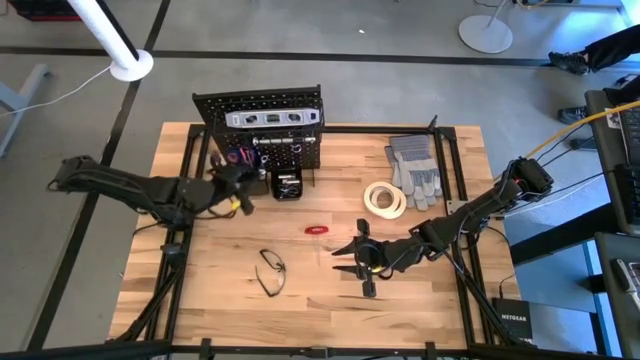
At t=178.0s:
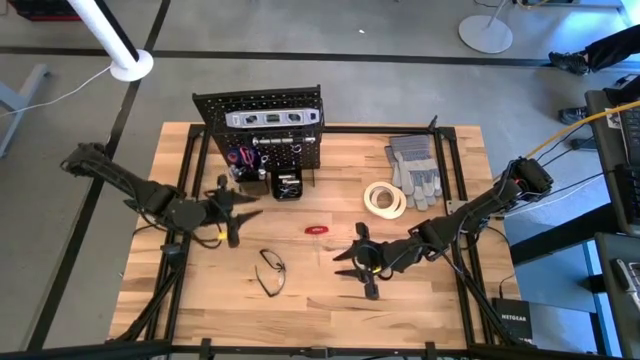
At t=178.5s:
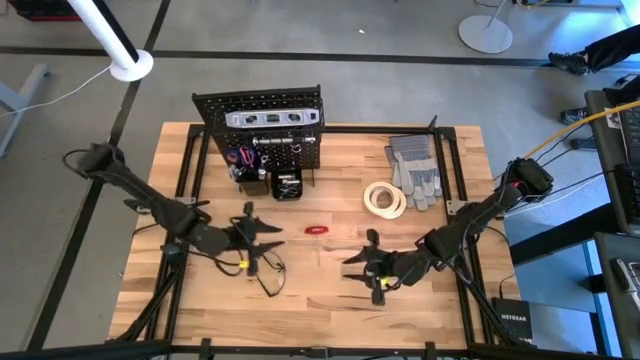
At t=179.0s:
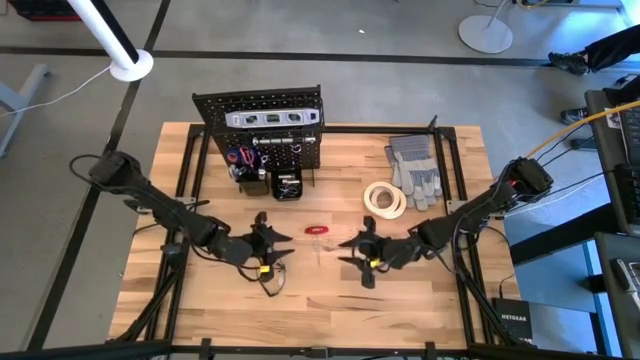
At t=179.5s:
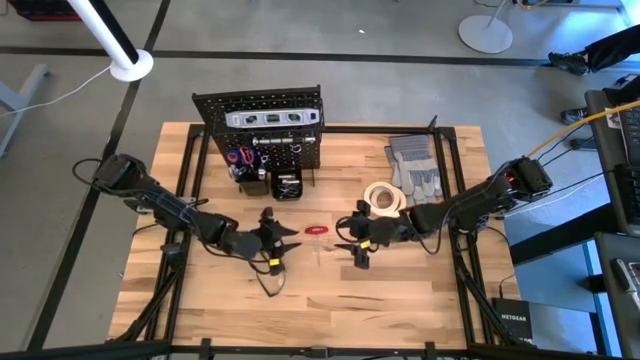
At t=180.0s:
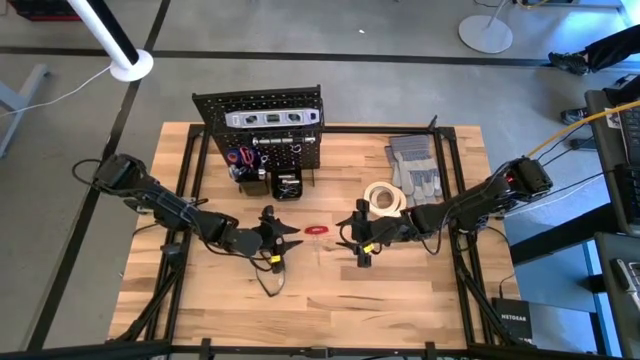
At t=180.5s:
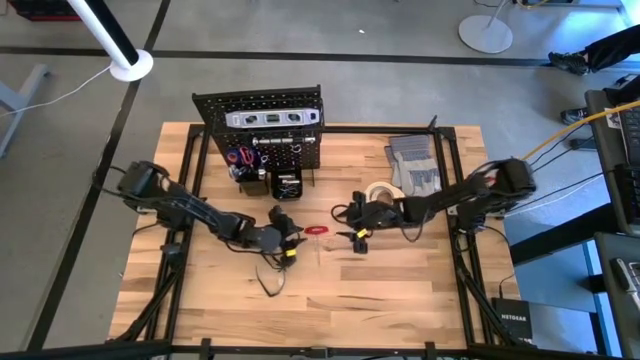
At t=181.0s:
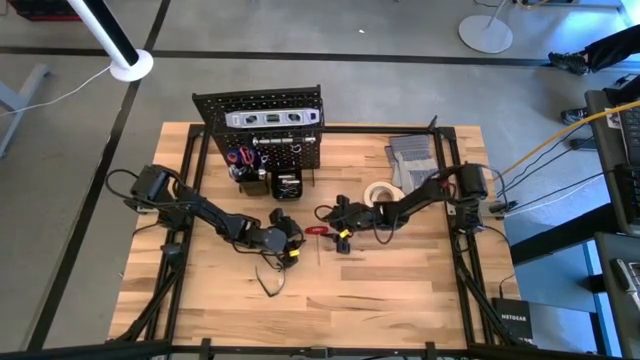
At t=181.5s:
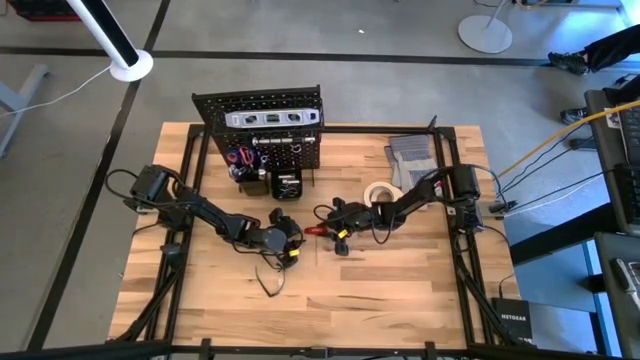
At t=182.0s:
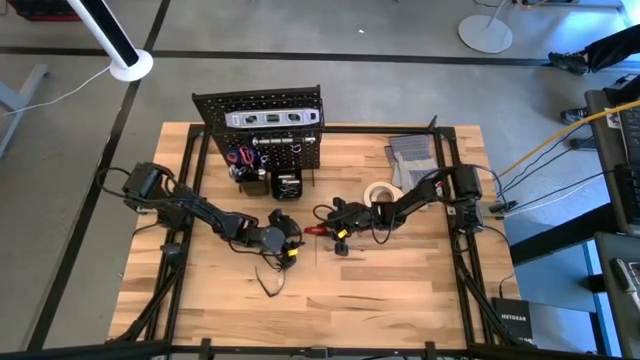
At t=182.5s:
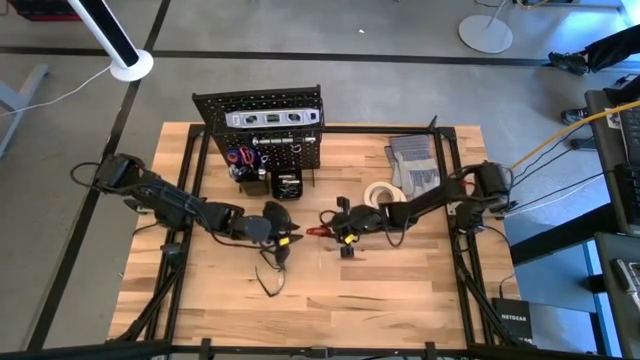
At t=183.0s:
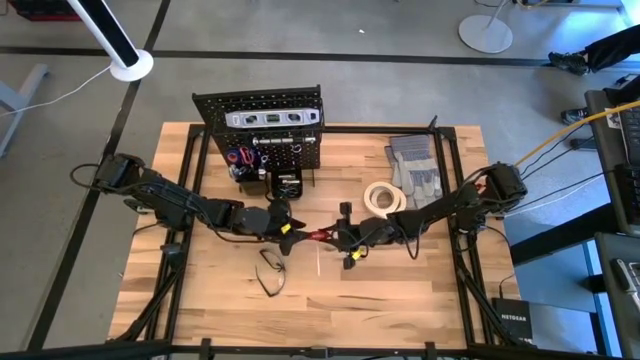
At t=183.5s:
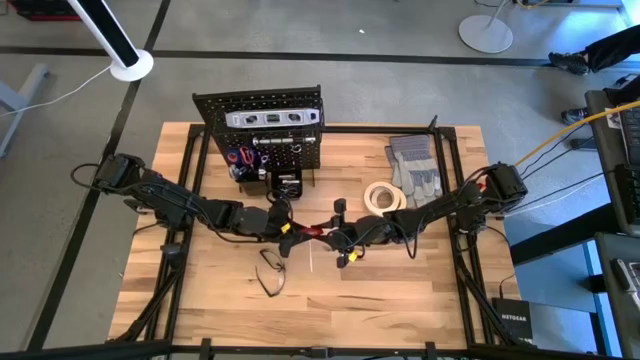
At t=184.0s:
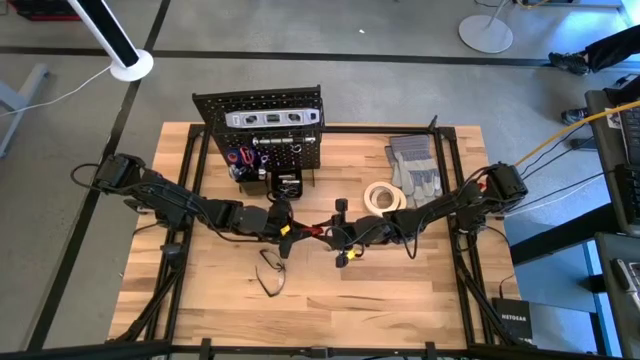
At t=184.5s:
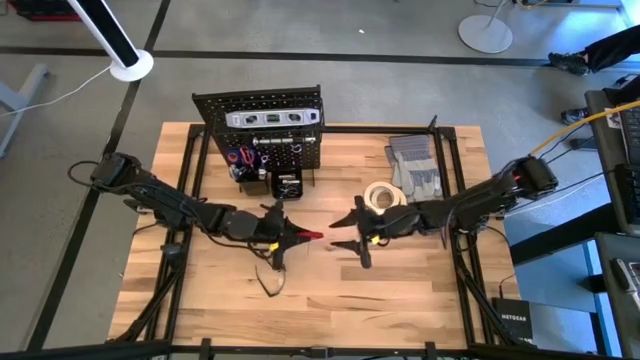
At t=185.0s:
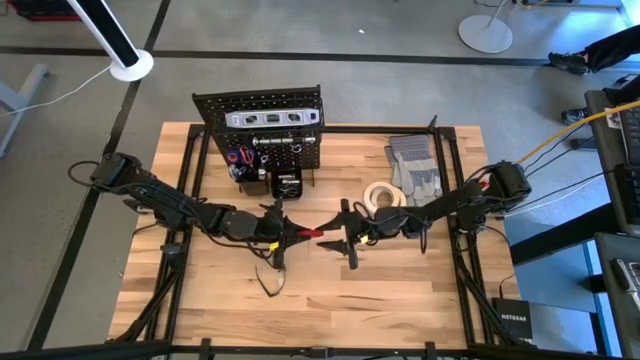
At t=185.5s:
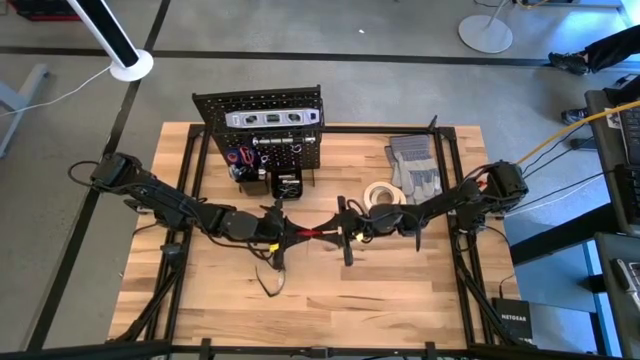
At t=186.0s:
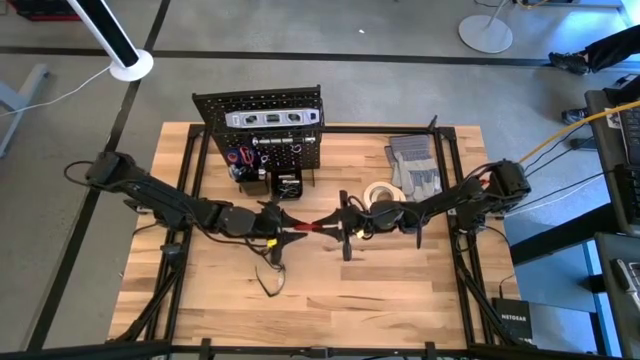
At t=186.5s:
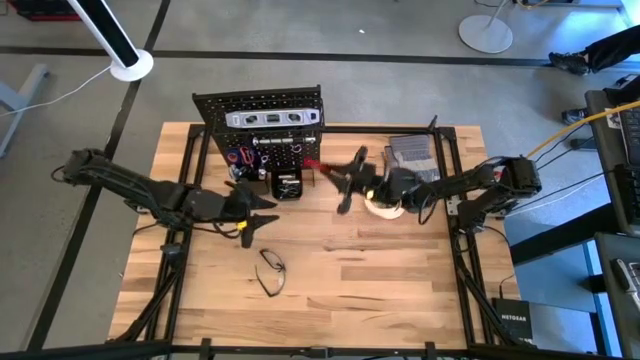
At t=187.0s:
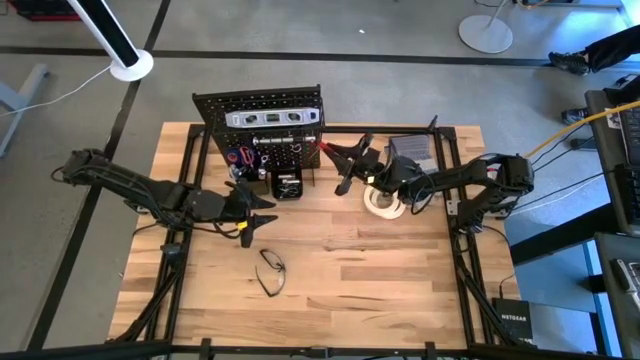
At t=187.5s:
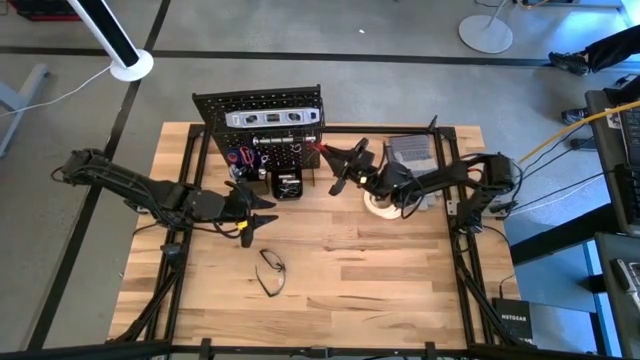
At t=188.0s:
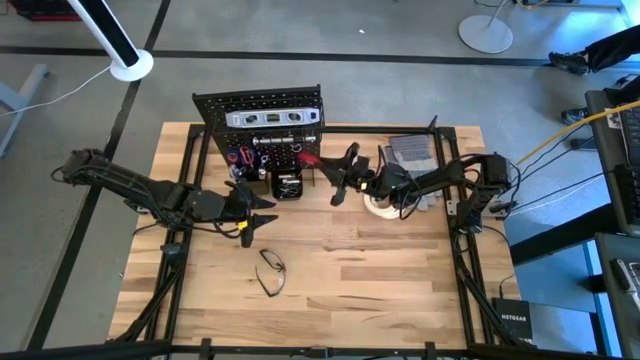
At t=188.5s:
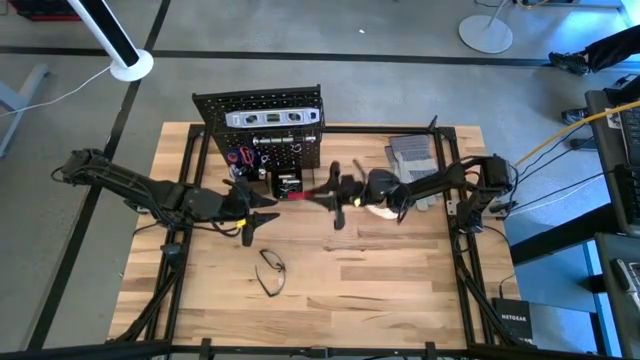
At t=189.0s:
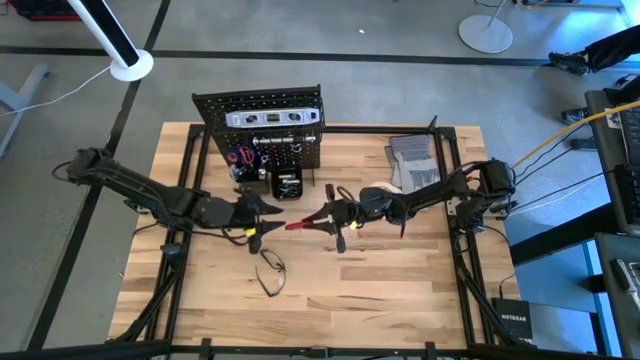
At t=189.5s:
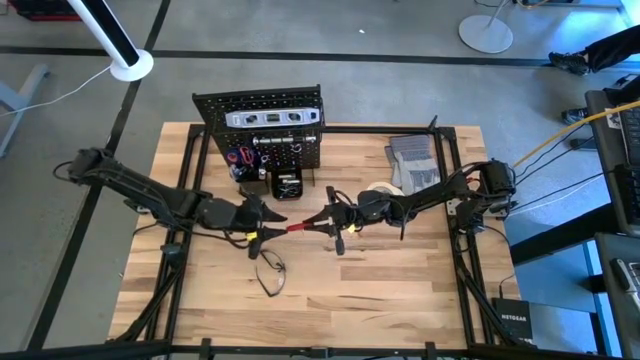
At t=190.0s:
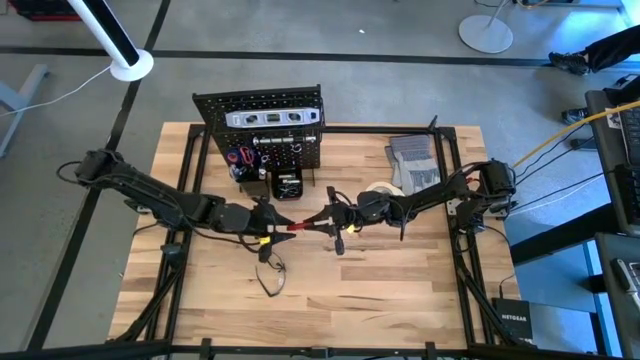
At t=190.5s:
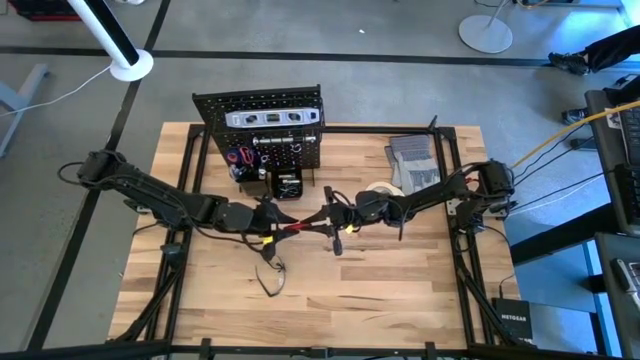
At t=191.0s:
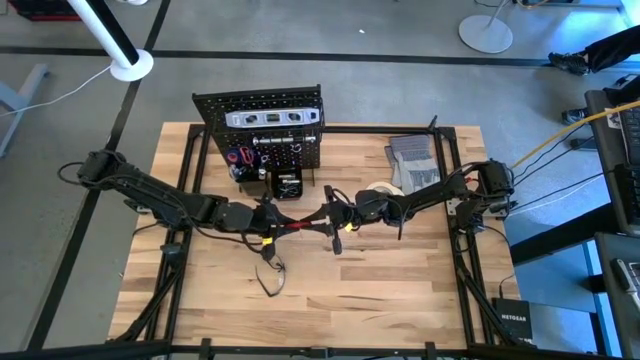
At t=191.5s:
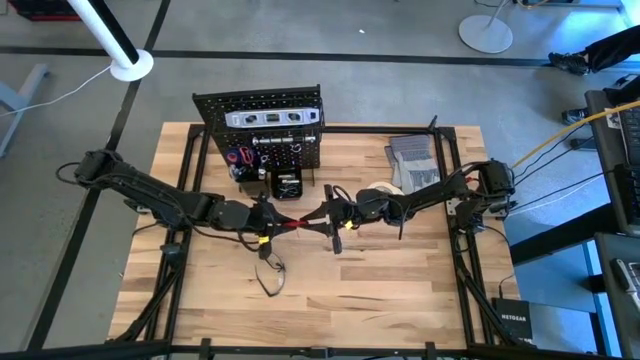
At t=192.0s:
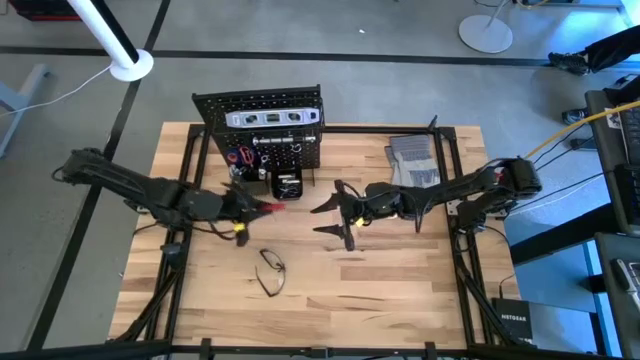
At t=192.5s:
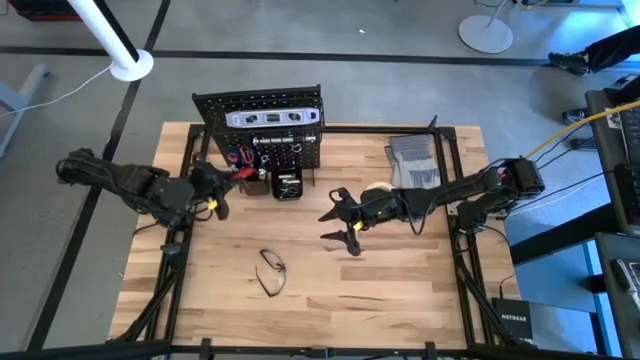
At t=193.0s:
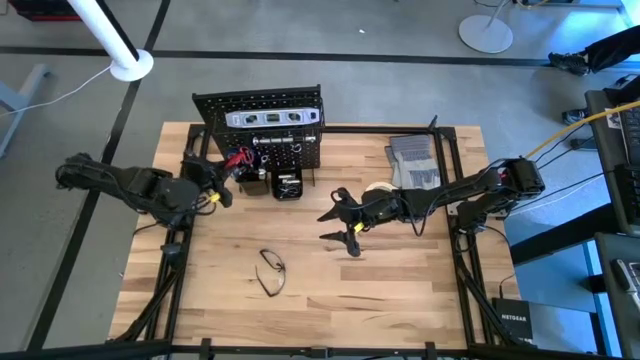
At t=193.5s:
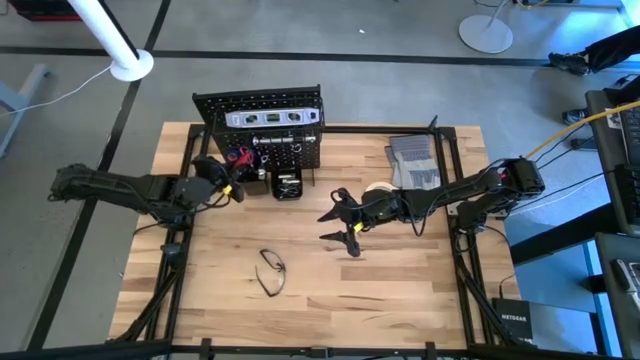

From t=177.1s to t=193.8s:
Task: Hang tools onto peg board
Put the hex key into the left pegboard organizer bin

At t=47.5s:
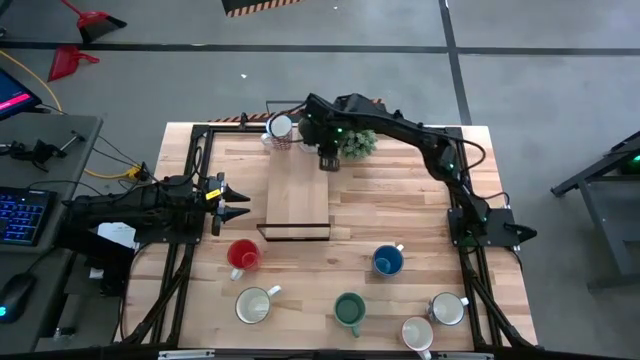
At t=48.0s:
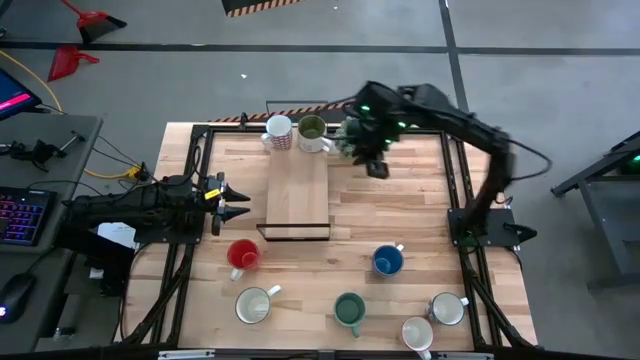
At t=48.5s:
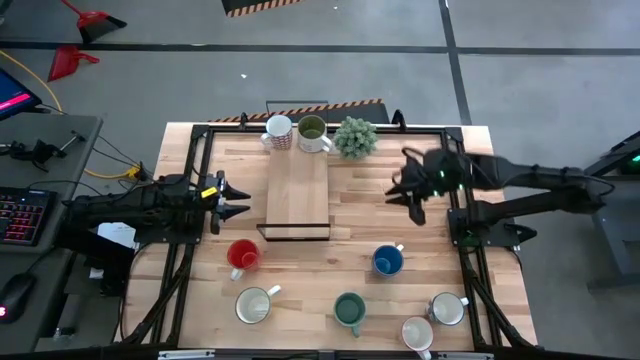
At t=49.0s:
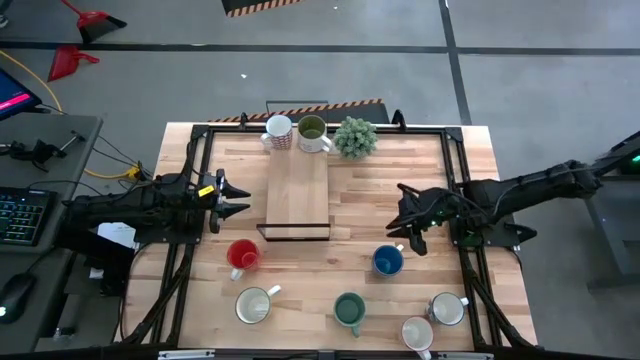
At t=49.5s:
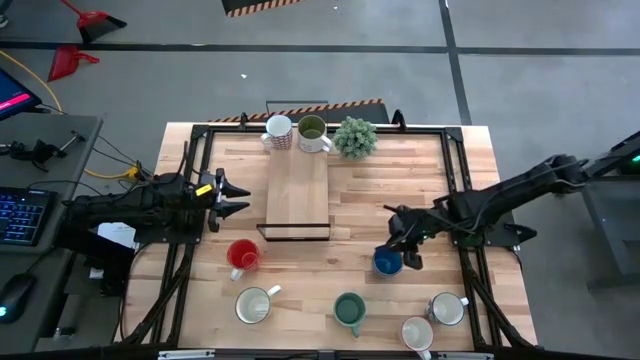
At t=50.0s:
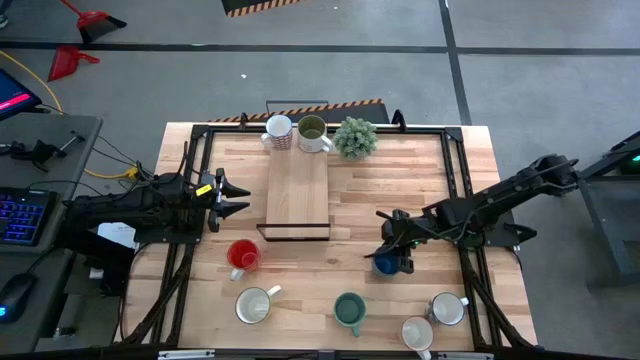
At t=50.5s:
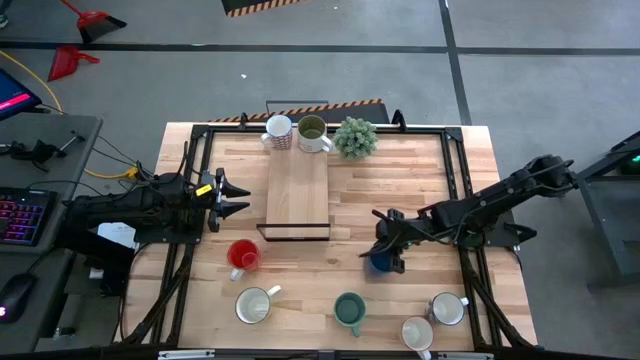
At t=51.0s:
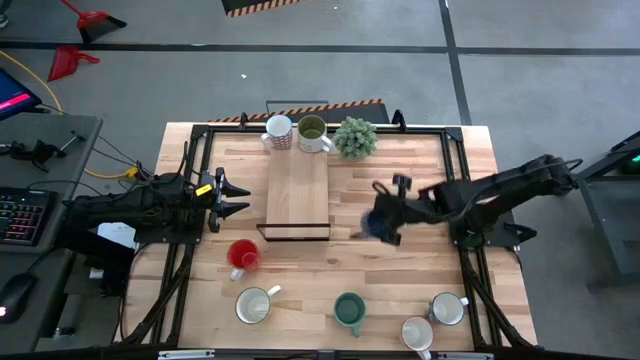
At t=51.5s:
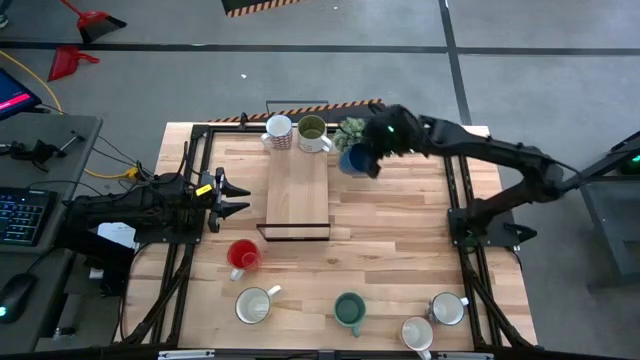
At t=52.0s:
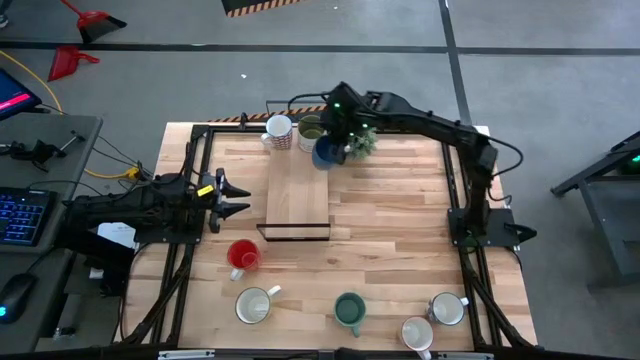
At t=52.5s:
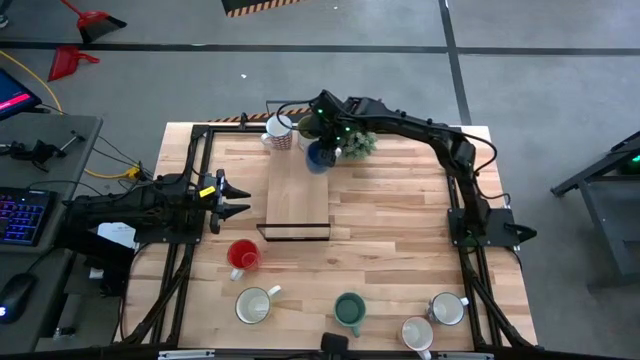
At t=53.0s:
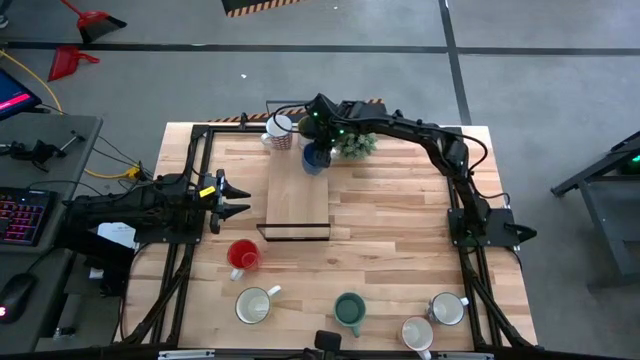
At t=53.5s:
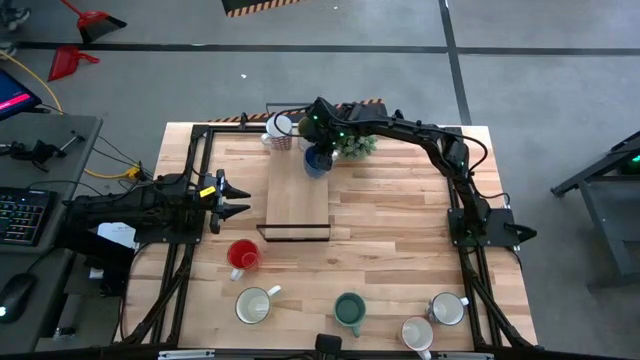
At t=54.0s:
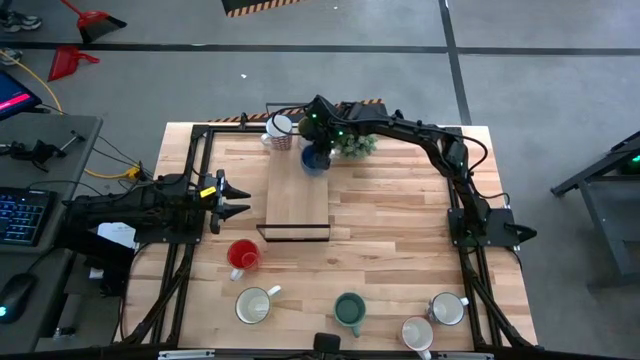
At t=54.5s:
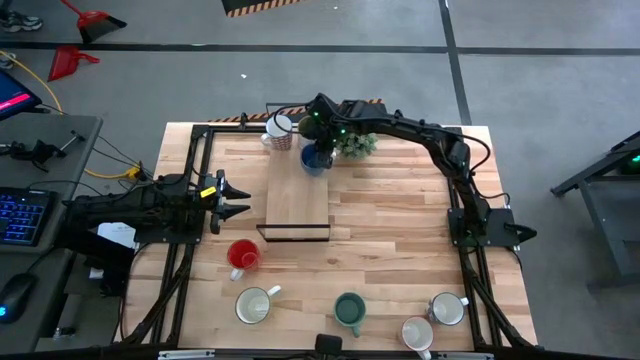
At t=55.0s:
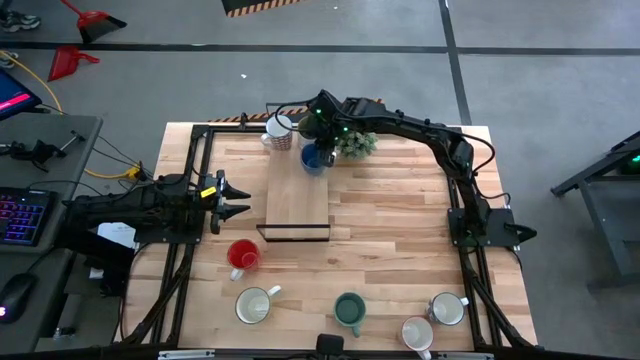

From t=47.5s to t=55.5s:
Task: Place coffee mugs
Put the blue mug on the shelf
